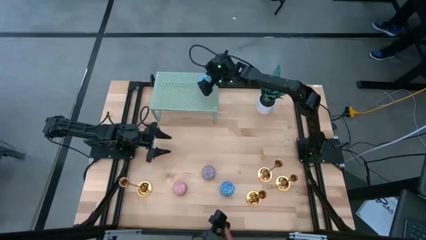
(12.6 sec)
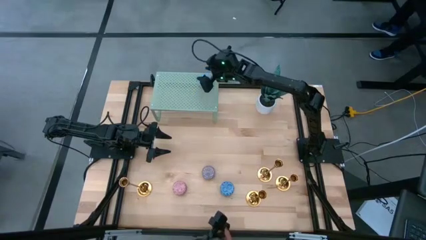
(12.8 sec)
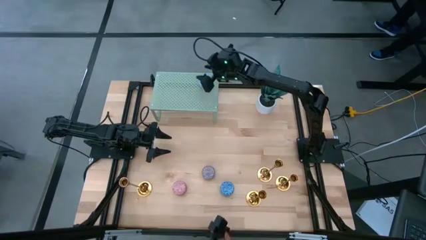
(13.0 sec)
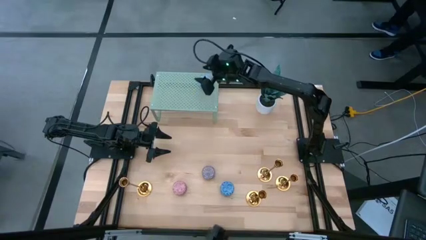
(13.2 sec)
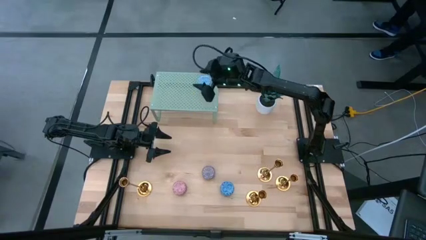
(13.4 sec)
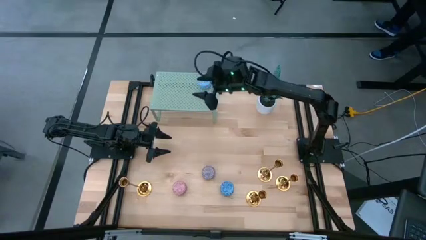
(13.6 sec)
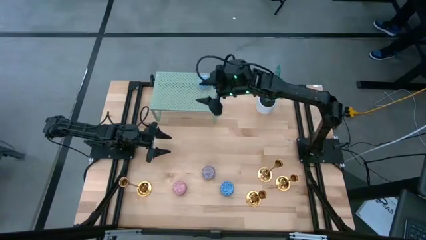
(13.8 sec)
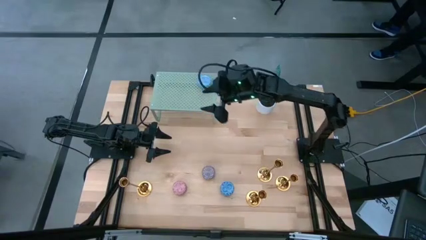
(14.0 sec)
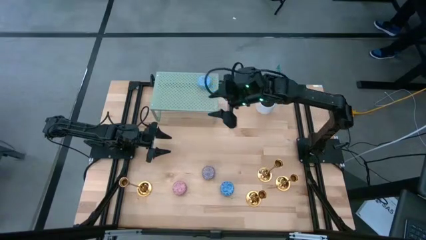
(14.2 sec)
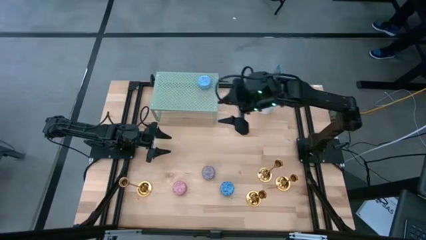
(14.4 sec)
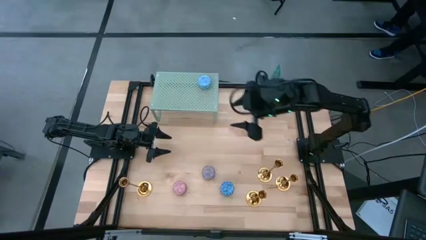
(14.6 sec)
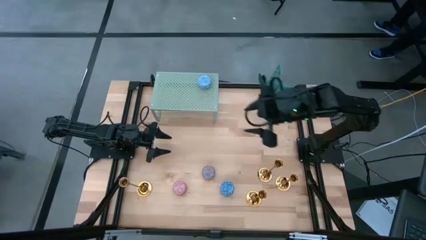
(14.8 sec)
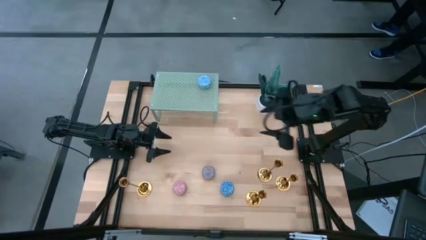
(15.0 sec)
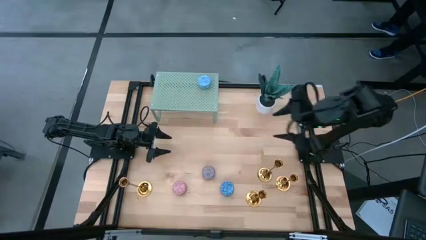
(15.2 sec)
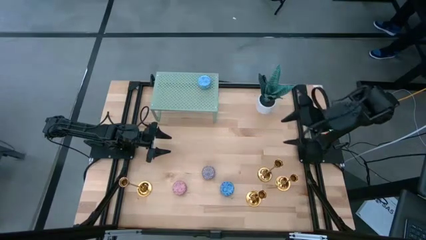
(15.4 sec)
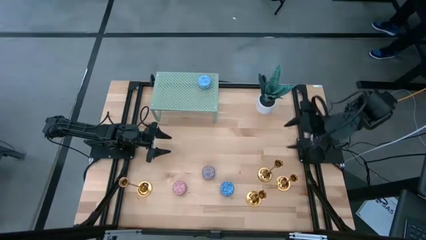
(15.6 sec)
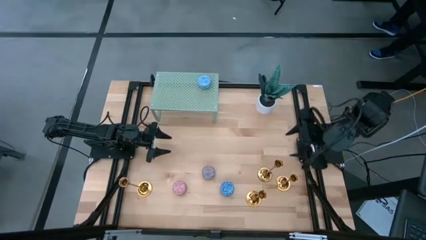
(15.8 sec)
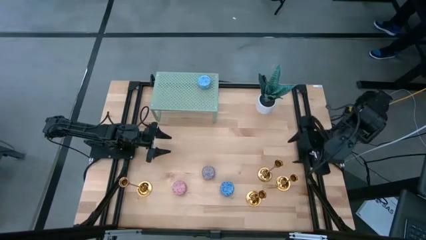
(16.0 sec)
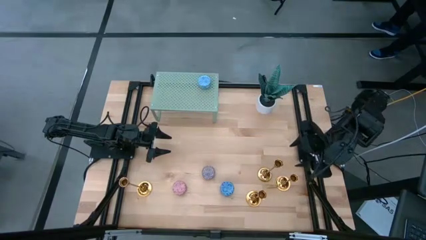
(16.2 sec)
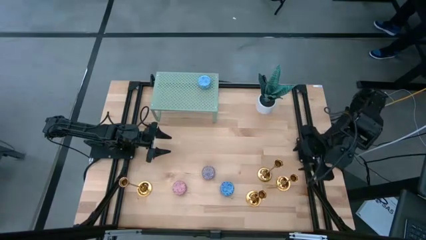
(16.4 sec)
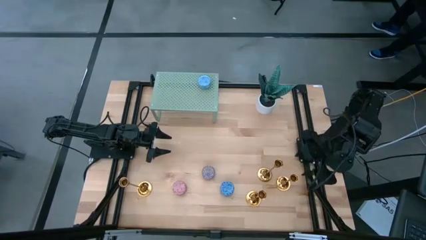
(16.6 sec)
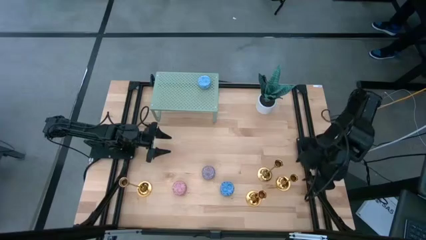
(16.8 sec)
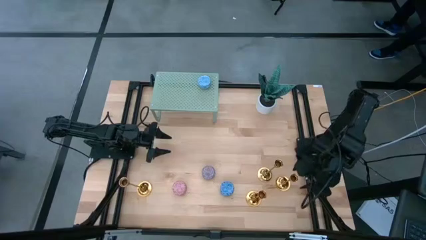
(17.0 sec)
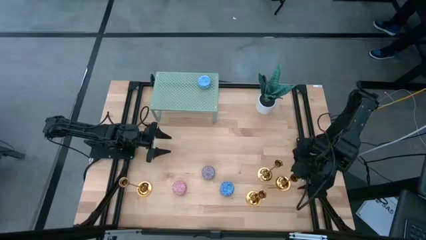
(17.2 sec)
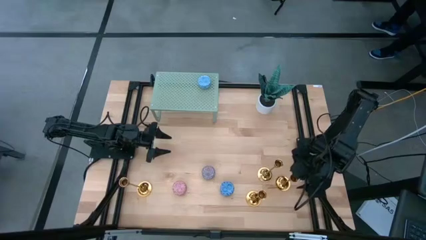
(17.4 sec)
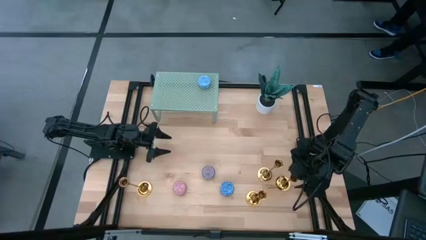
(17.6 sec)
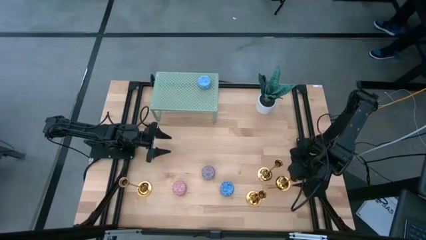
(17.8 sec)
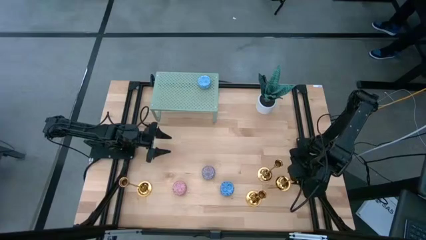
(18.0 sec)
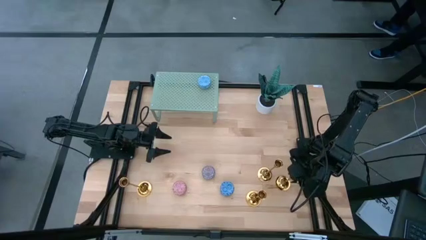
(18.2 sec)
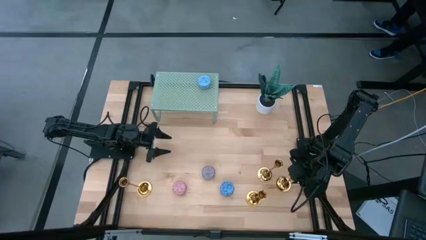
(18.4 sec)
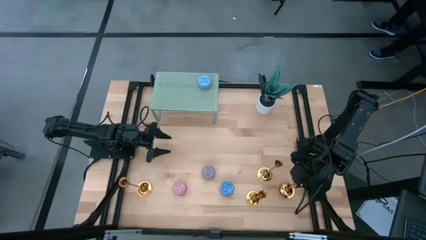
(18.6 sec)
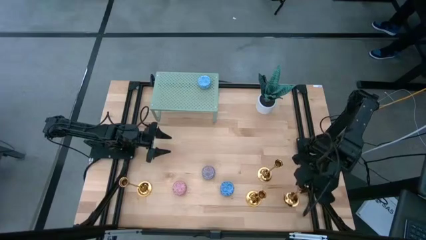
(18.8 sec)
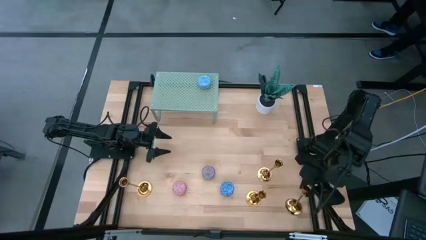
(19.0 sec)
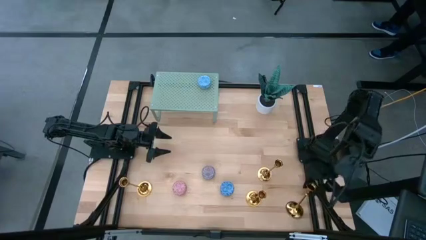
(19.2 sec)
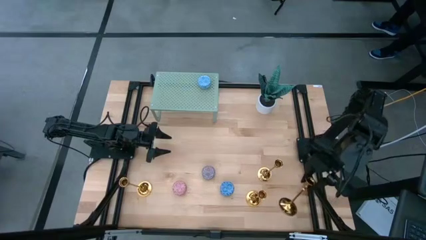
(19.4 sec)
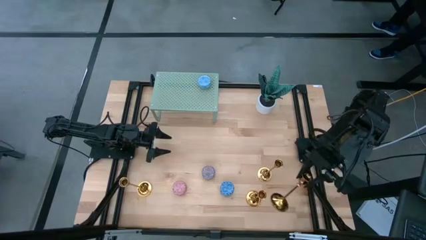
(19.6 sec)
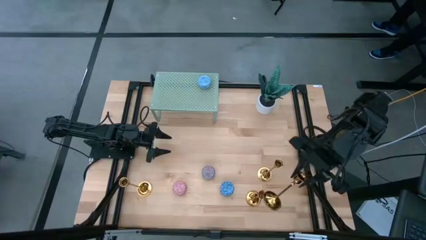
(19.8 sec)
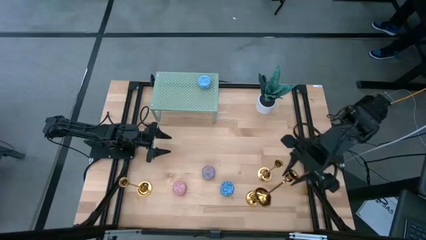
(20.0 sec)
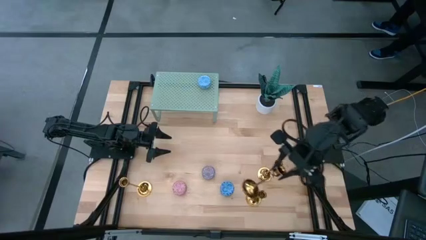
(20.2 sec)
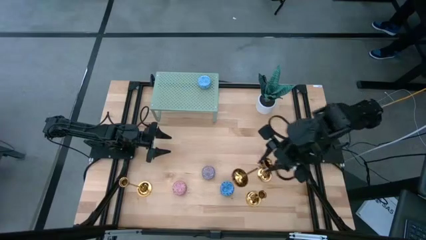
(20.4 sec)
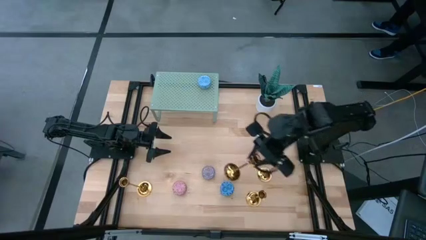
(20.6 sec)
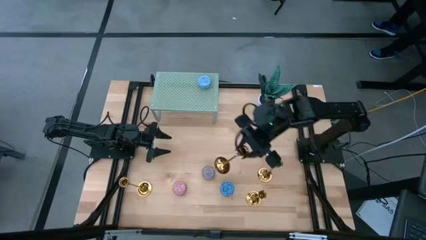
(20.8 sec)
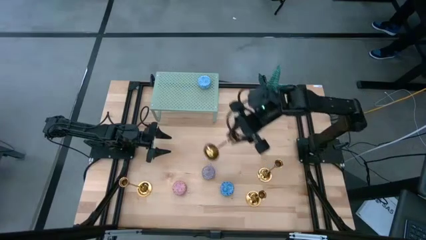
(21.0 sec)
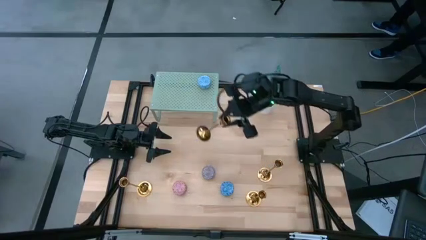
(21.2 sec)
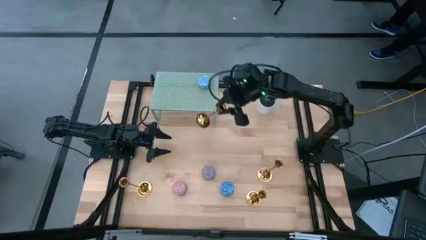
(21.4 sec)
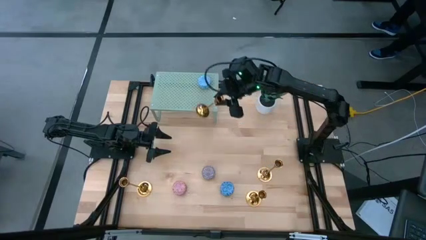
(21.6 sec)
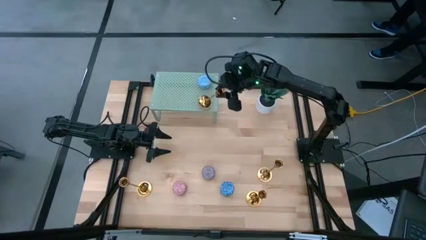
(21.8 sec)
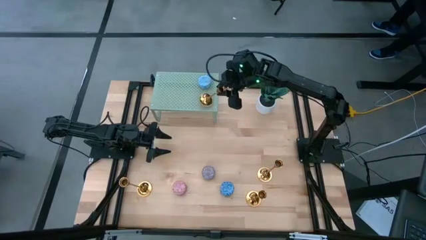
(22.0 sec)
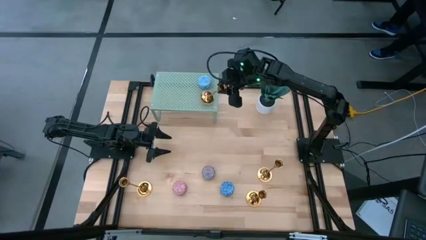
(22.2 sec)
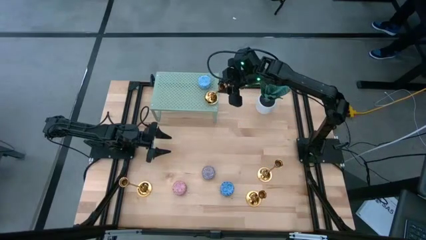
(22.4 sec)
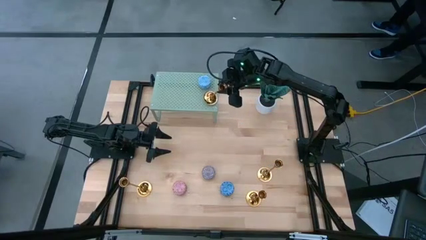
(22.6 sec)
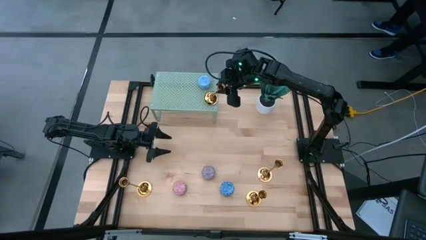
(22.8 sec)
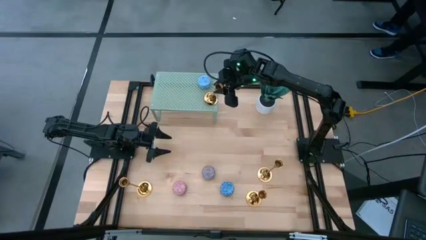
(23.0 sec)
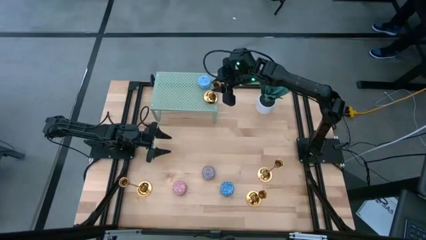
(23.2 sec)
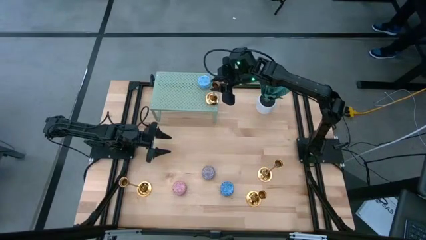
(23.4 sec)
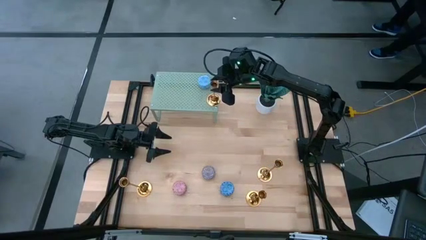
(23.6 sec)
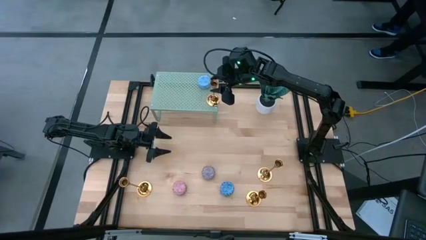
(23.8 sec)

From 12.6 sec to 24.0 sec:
Task: Pick & Place candle stick holders
Put the gold candle holder on the shelf
